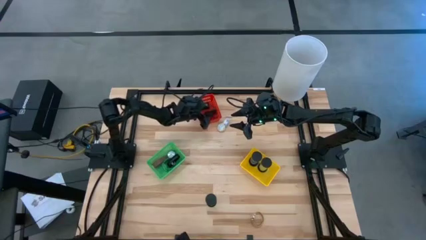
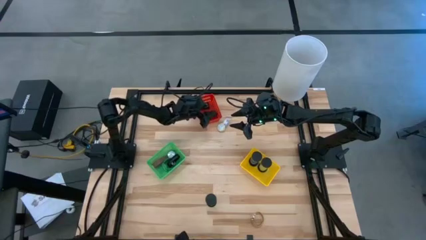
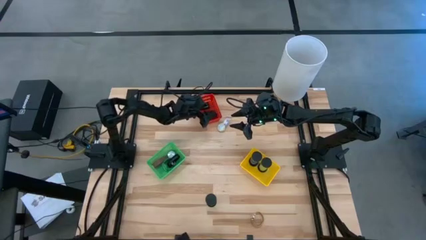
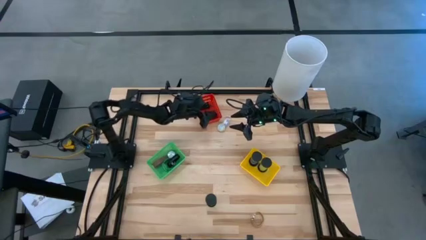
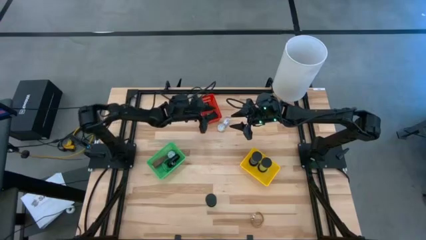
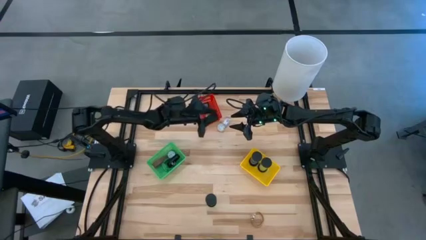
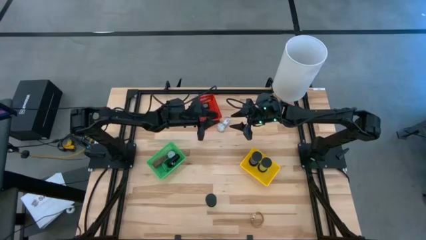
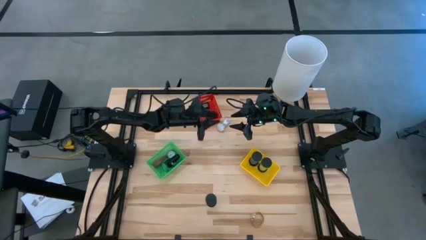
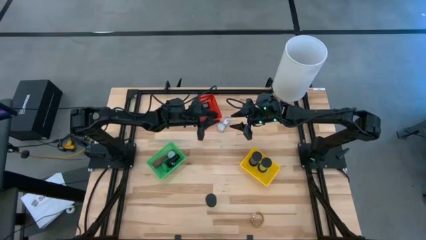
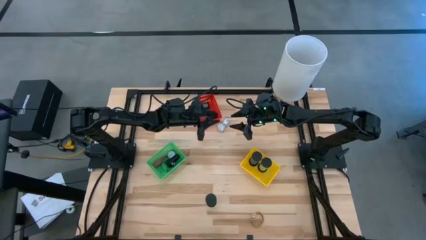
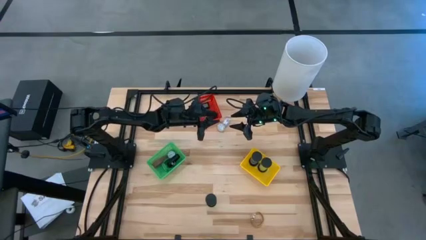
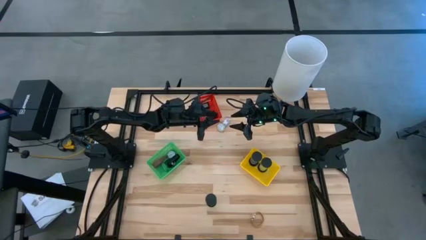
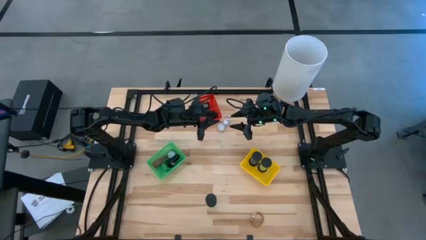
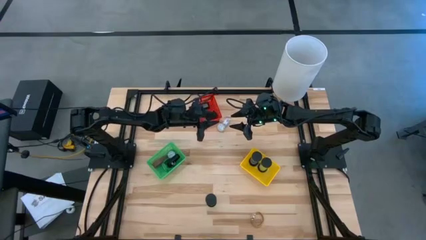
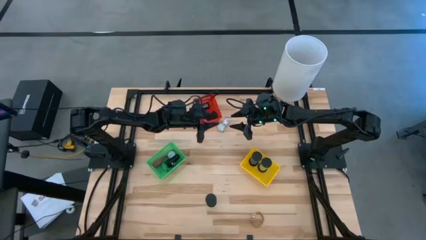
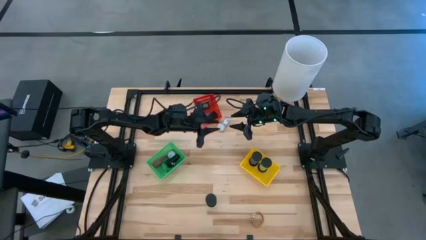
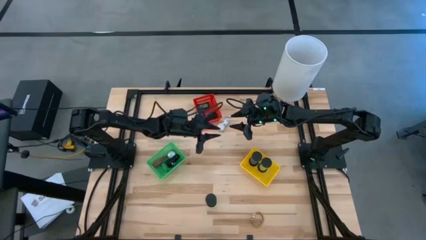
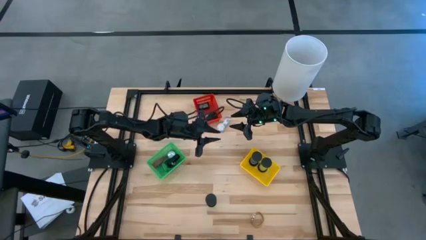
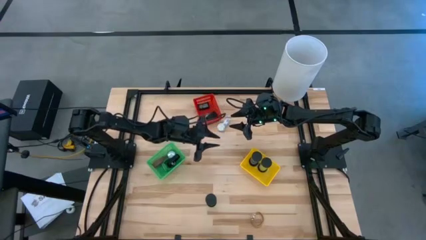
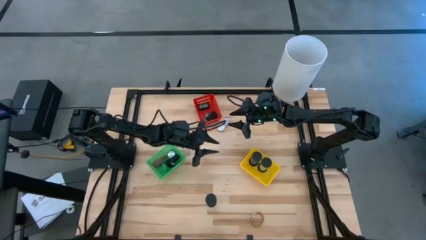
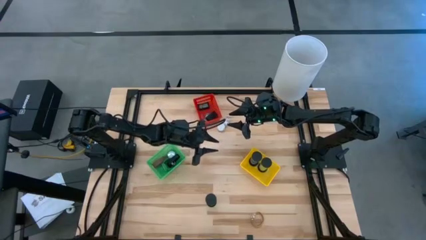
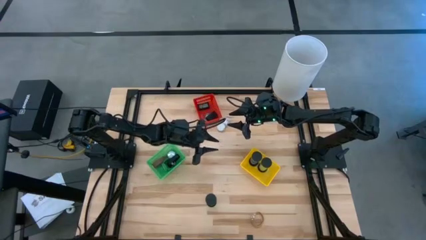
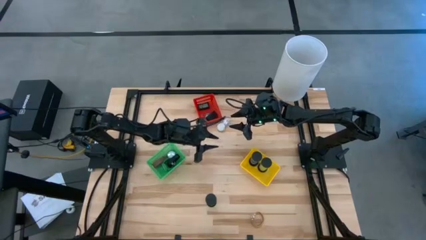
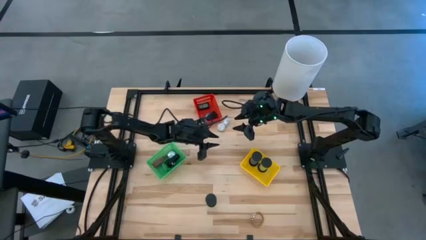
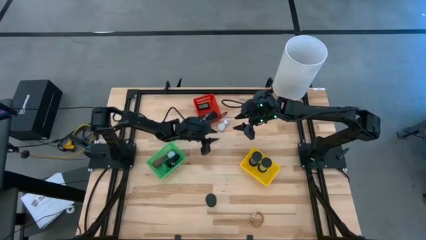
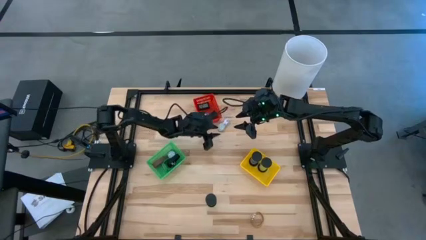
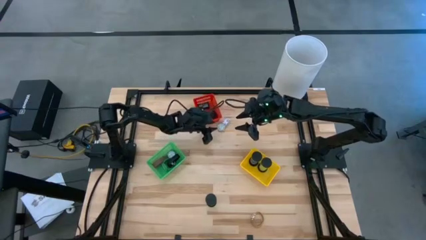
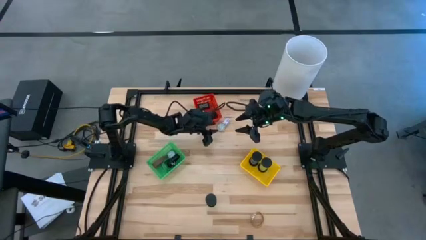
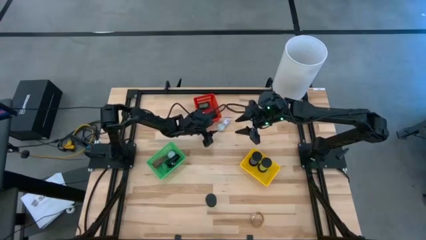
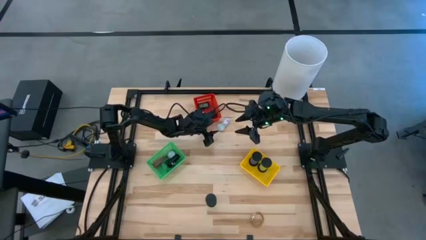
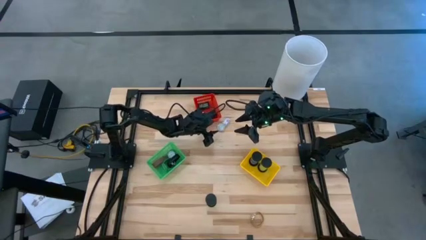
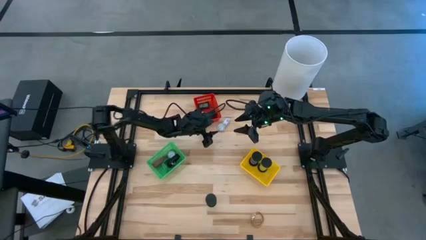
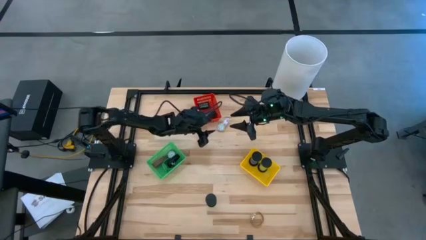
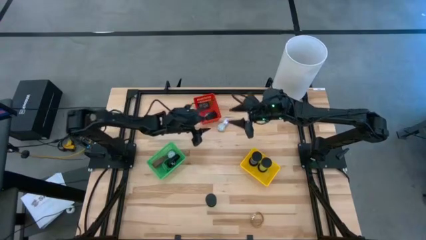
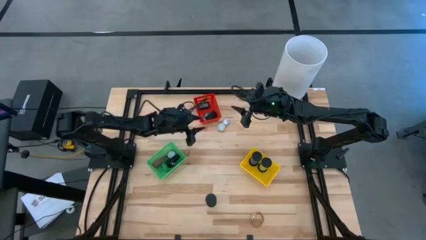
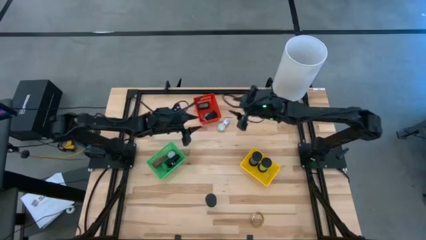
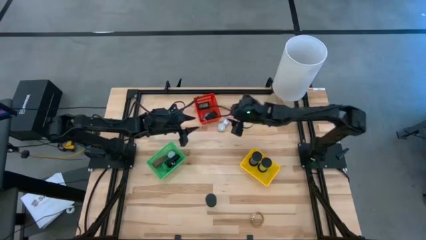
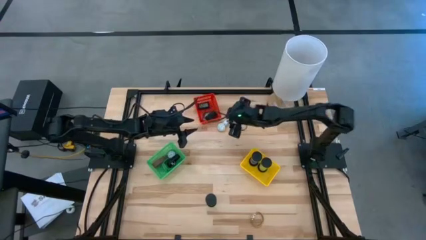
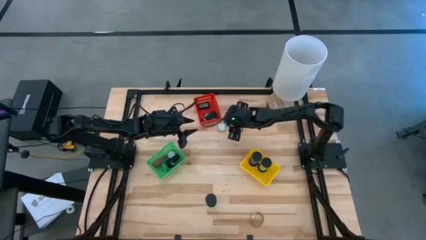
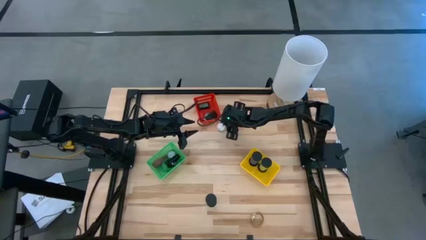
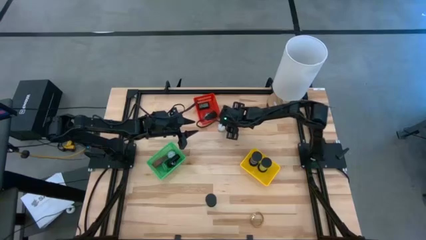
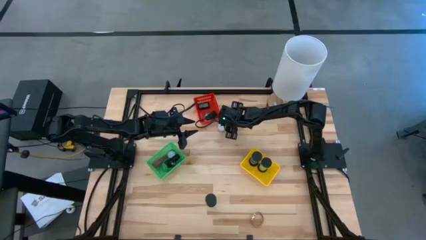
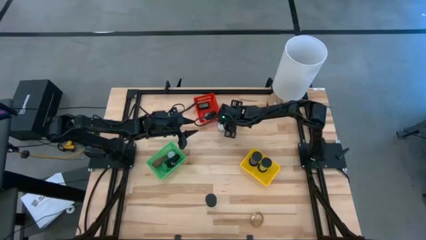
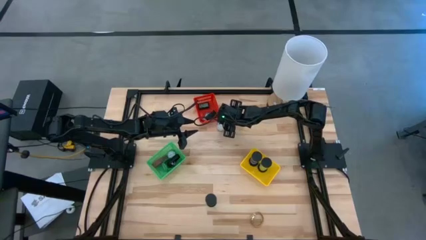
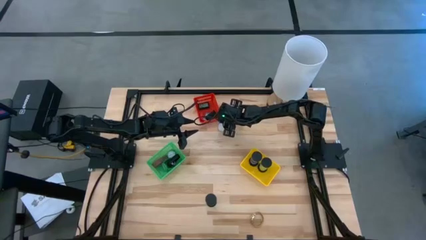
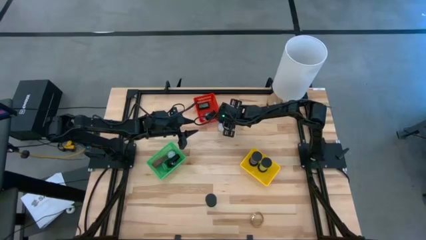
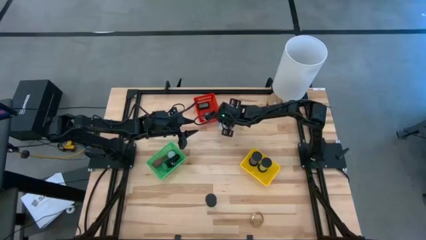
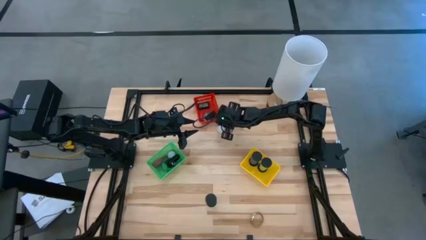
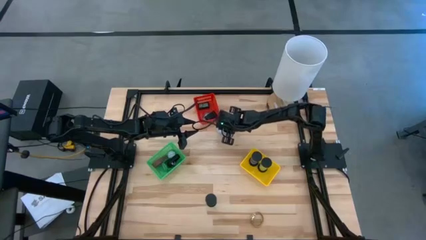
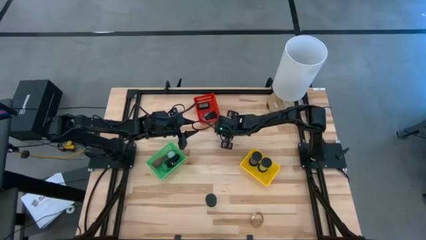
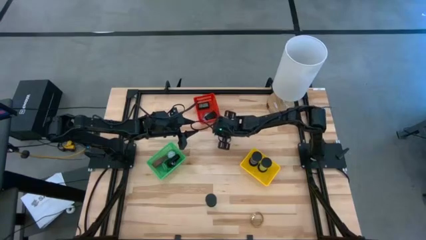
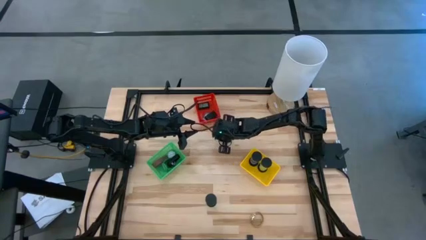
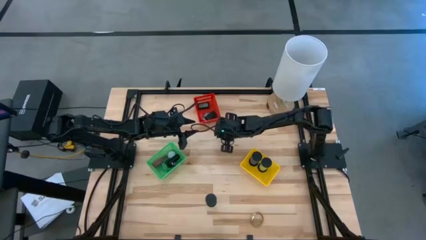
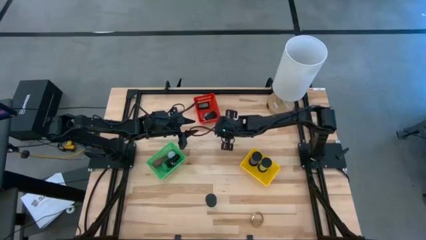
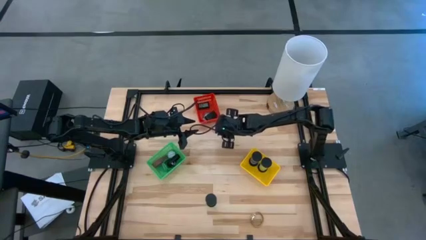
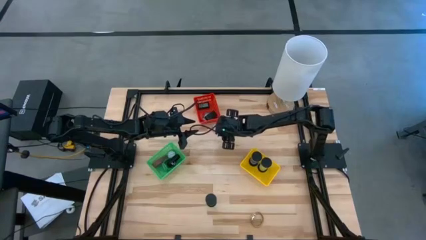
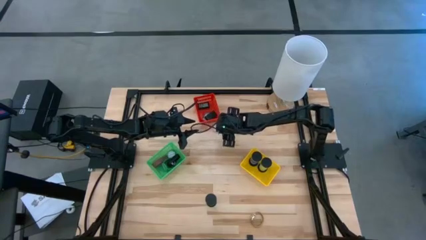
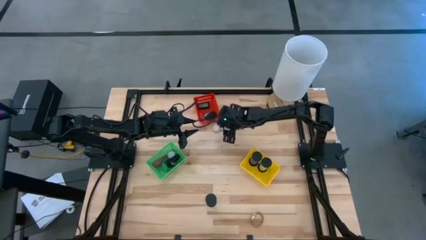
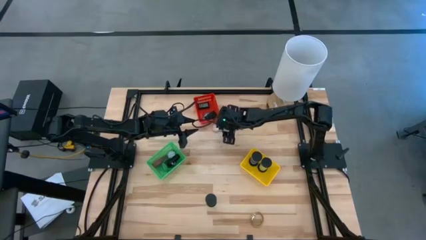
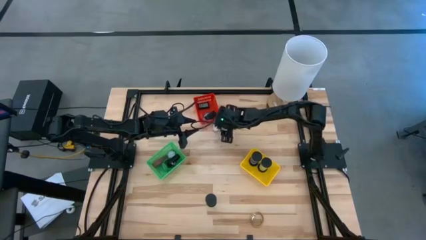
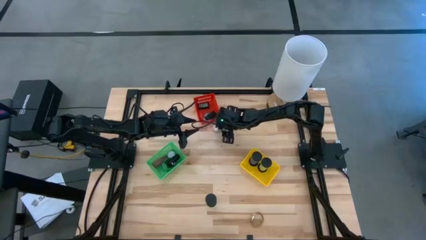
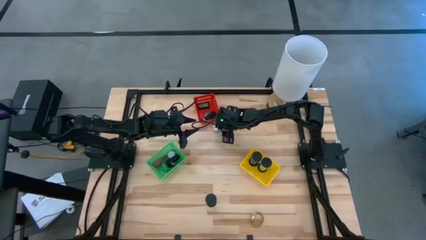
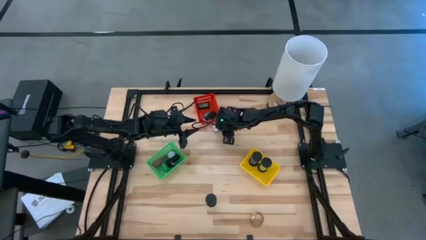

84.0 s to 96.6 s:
Task: Pick & Place Office items
Put the white wrist watch into the green bin

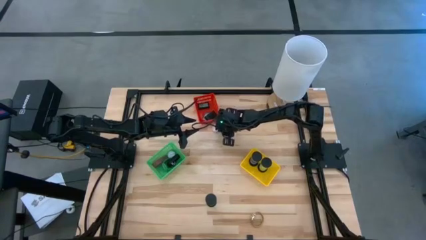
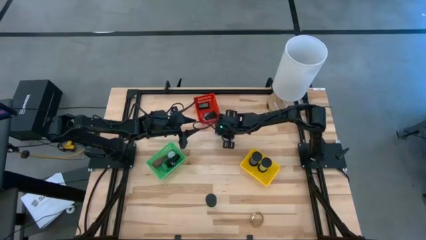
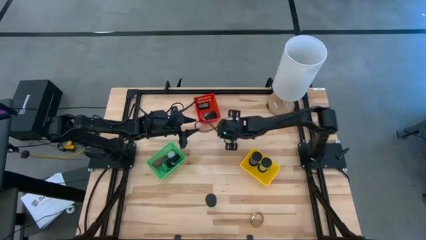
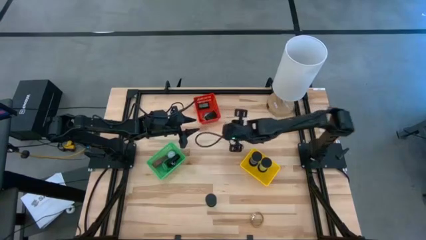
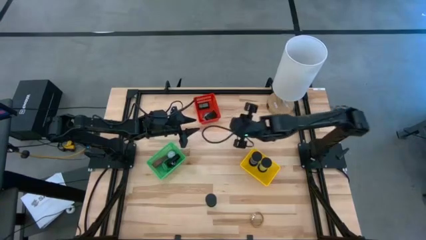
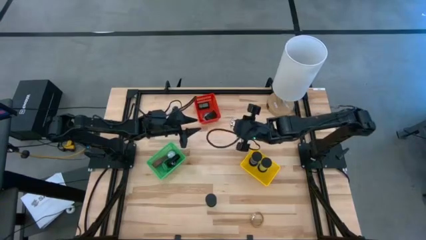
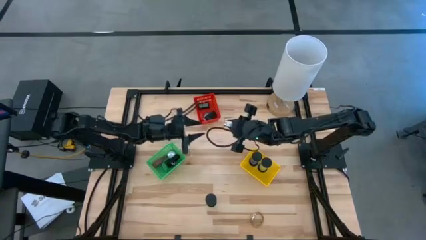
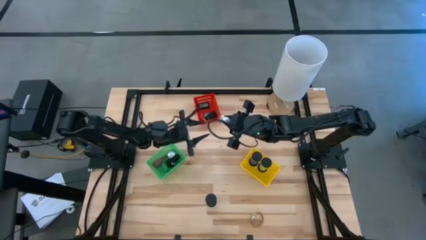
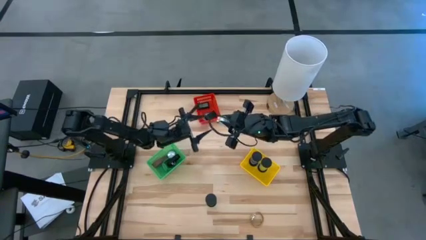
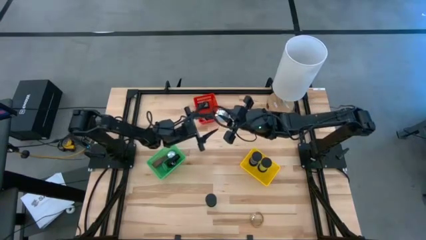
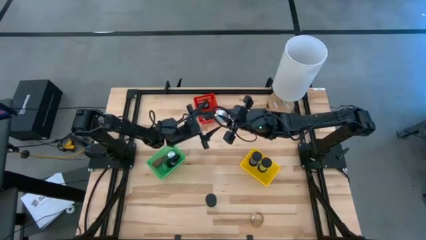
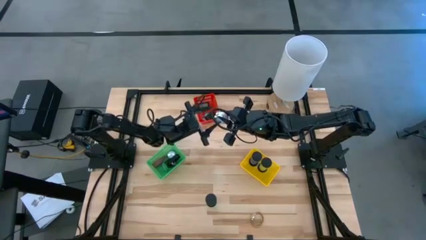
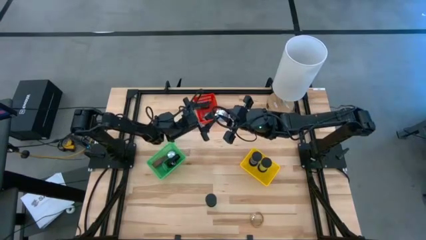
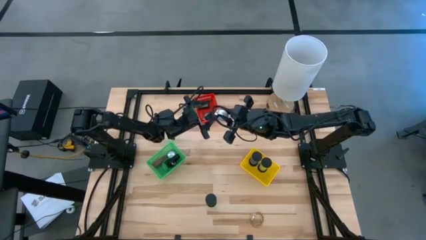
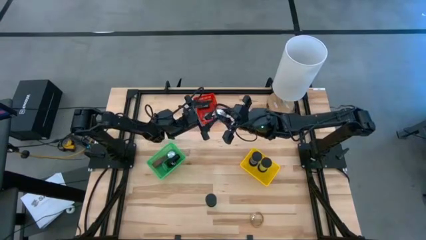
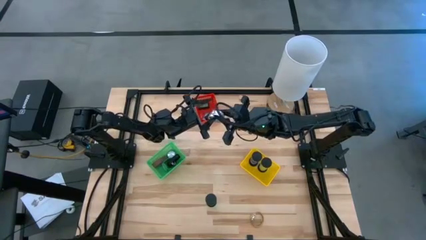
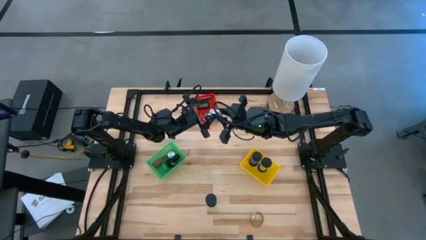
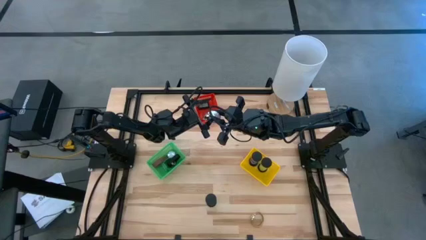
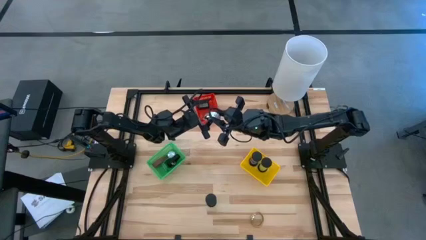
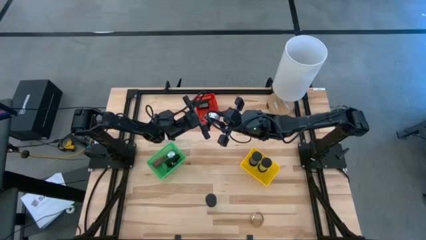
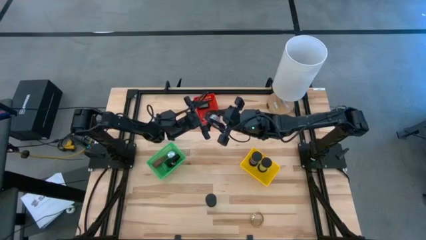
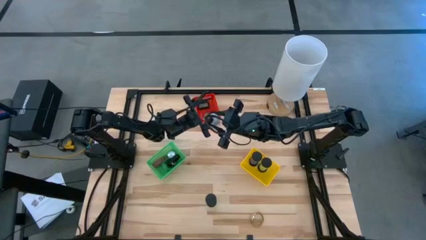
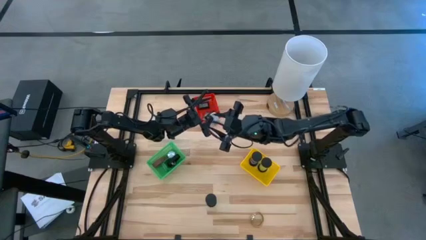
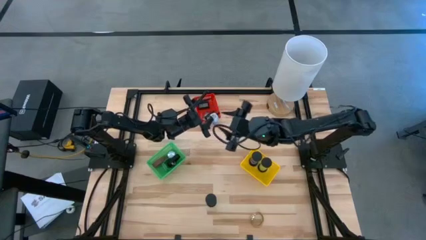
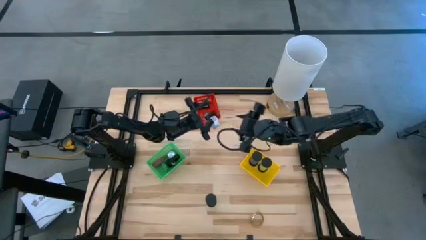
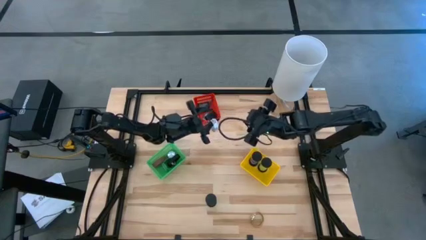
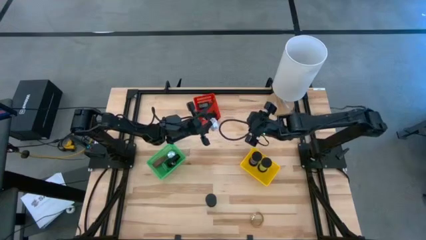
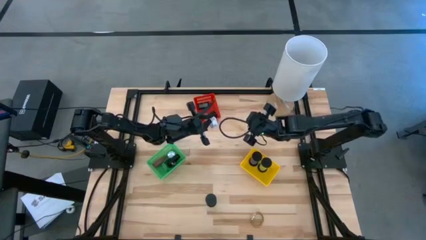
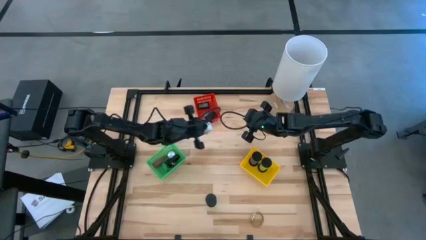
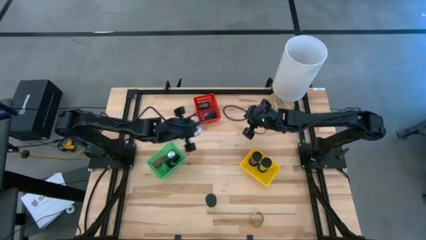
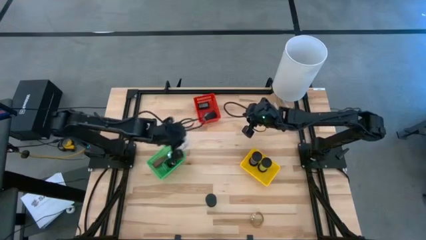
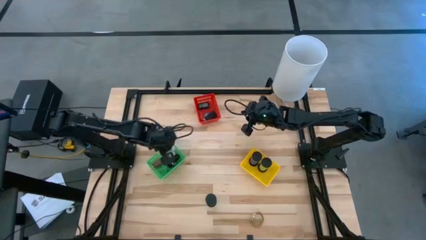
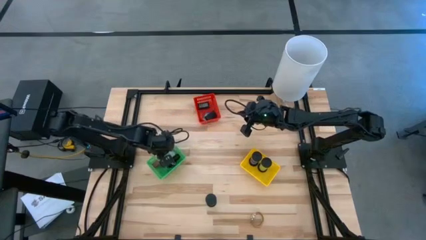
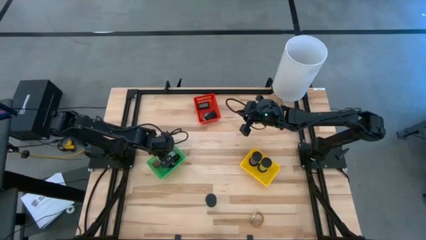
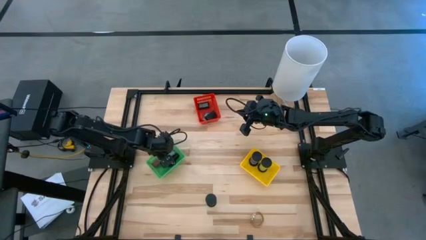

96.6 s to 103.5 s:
Put the white wrist watch into the green bin
